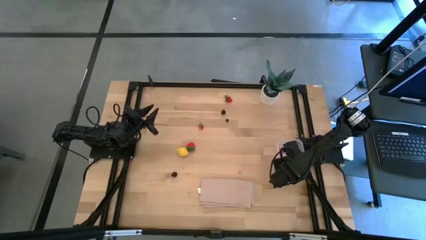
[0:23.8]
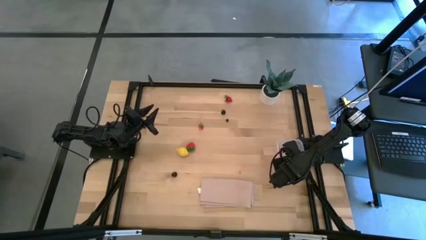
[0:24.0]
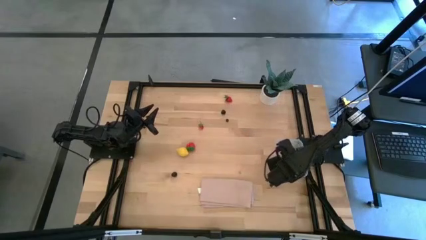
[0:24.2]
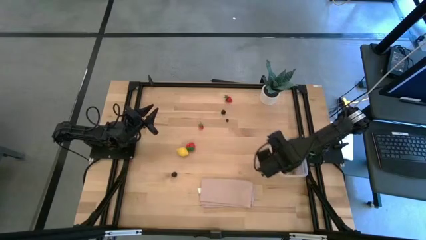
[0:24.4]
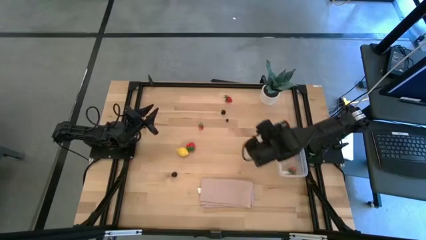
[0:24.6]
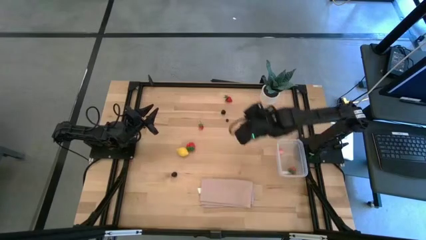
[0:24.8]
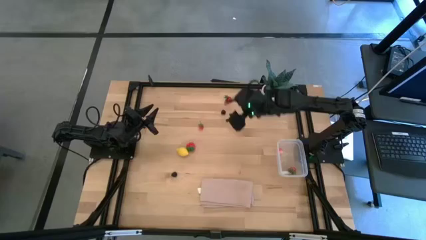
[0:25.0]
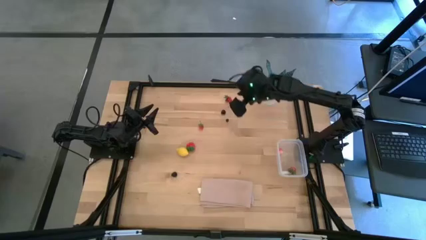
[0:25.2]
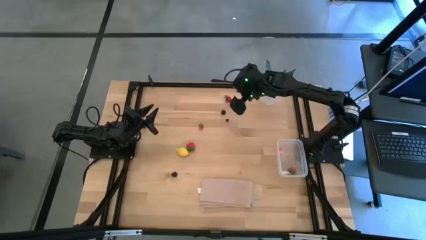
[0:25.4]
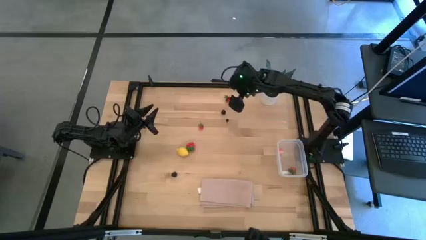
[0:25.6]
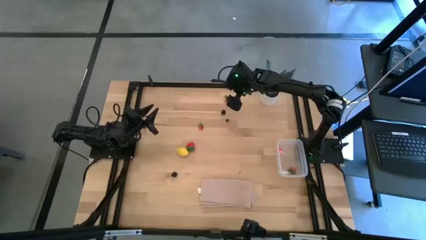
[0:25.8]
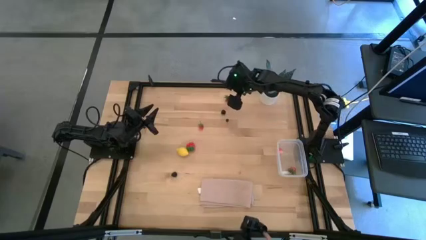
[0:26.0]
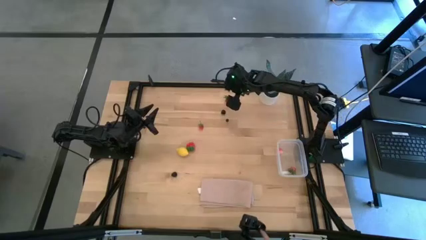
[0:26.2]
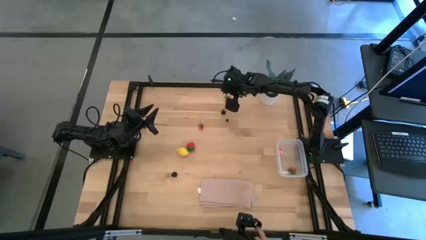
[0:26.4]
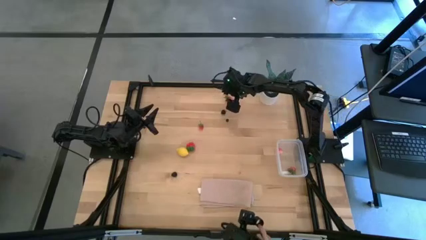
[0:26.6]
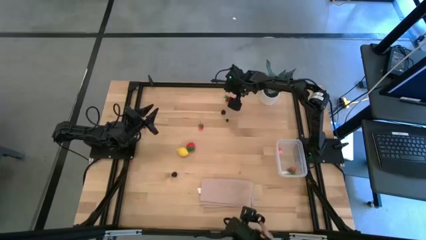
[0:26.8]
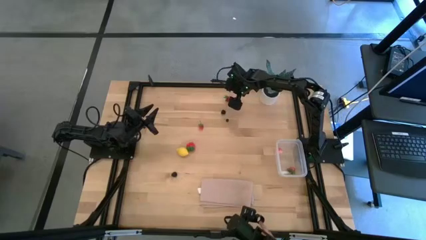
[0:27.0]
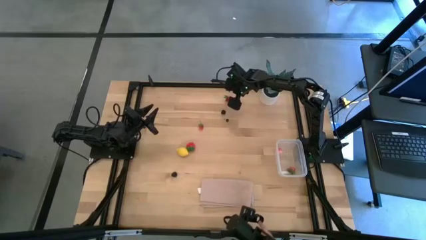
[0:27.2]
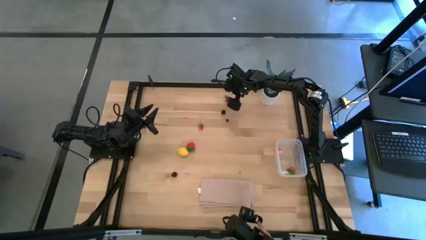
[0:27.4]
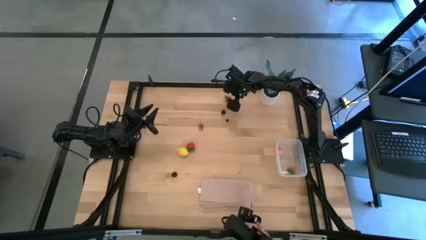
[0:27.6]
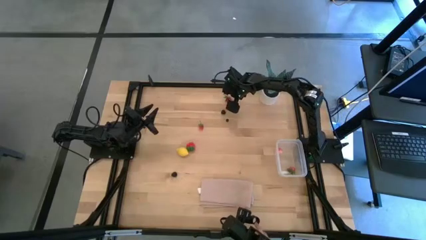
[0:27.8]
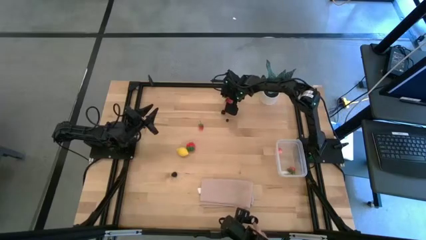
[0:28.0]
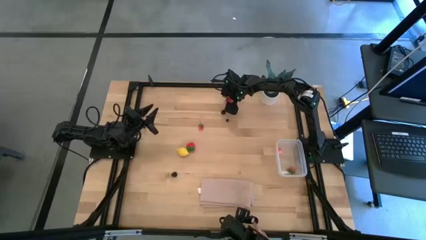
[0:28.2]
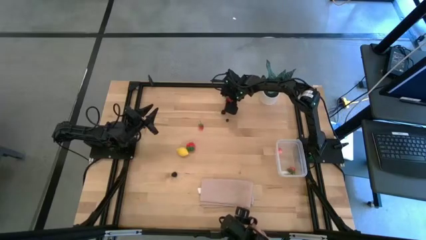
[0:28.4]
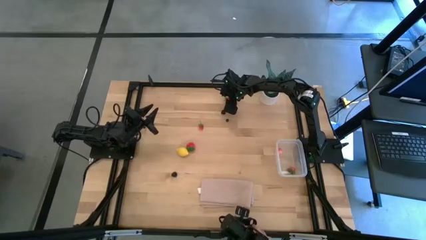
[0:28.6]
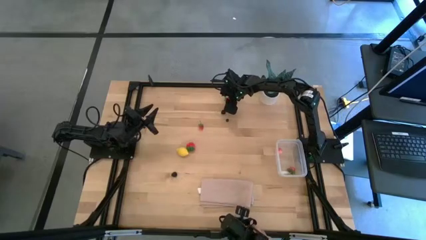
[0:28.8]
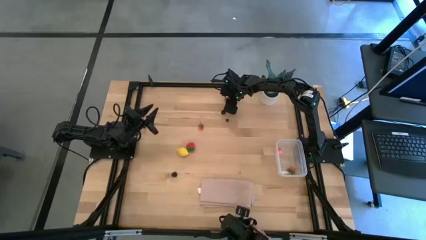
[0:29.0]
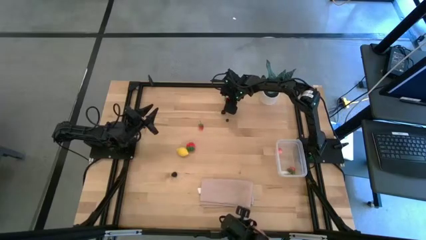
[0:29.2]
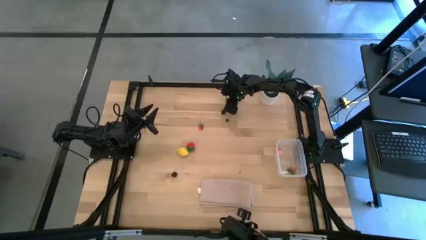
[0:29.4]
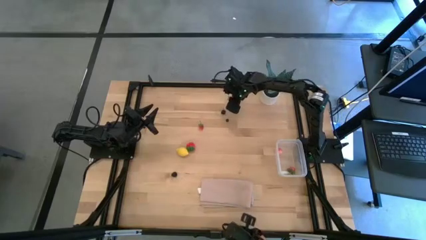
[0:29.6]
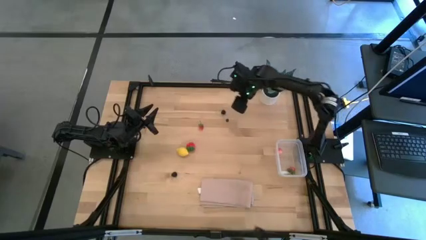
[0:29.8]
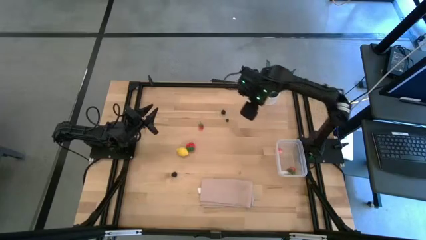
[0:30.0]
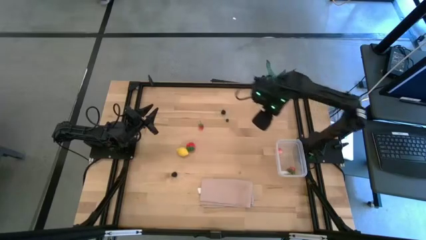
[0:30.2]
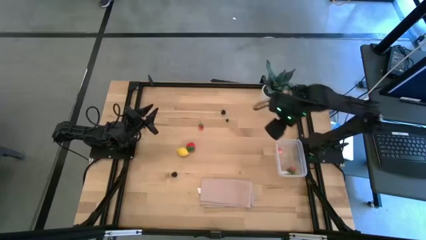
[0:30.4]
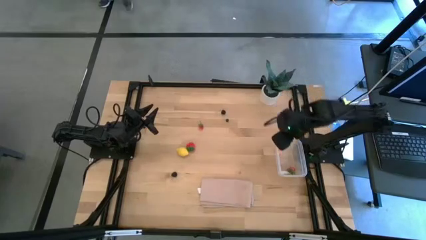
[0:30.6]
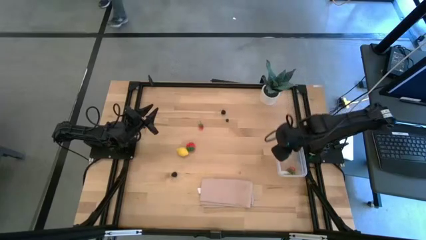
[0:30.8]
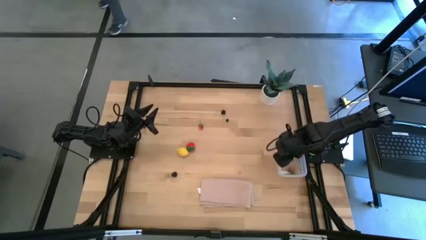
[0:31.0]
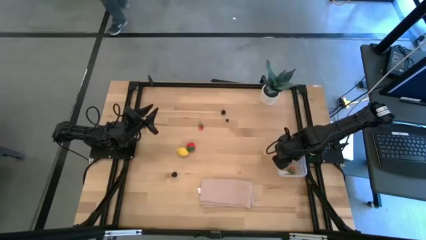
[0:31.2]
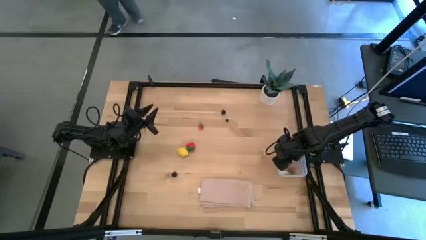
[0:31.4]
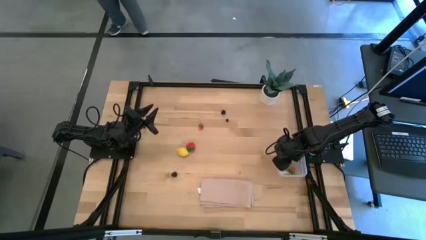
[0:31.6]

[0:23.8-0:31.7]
Task: Pick and placing Produce into tupperware
Put the top red strawberry into the transparent bin

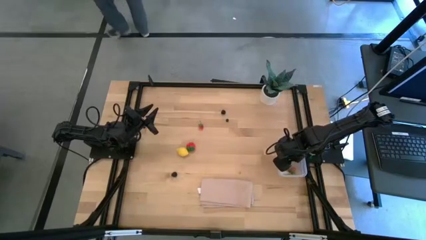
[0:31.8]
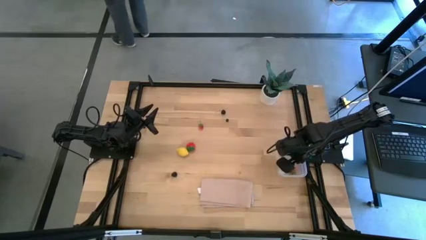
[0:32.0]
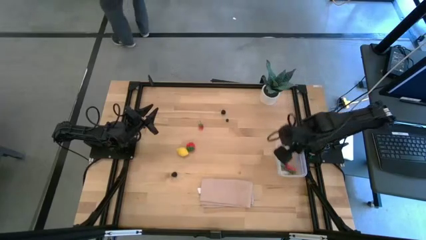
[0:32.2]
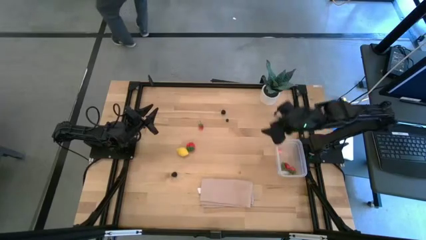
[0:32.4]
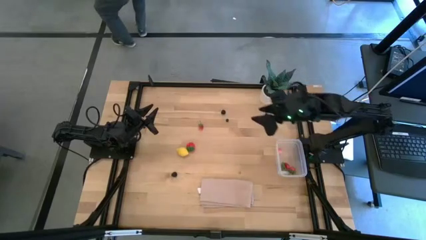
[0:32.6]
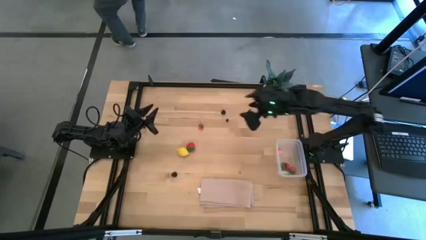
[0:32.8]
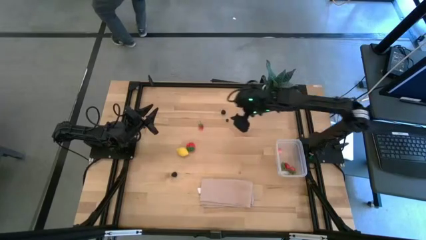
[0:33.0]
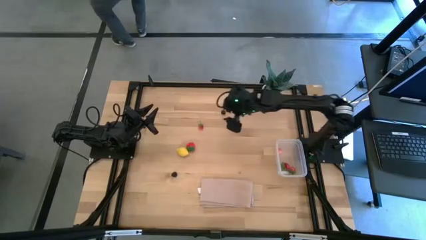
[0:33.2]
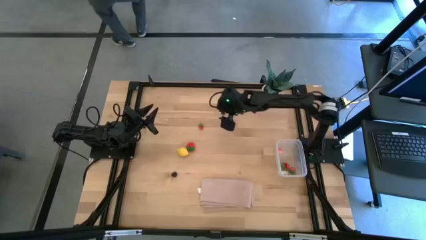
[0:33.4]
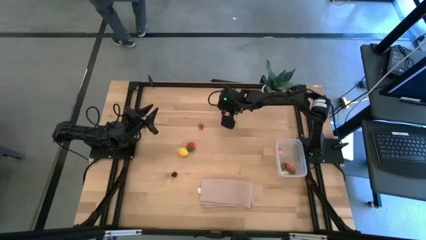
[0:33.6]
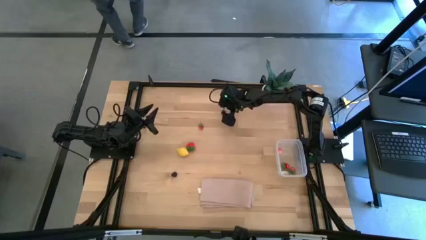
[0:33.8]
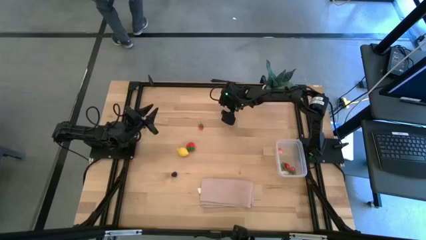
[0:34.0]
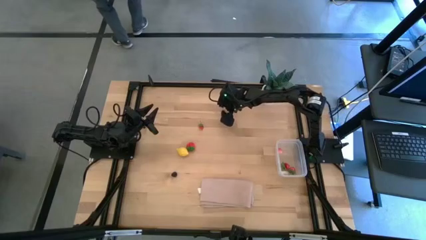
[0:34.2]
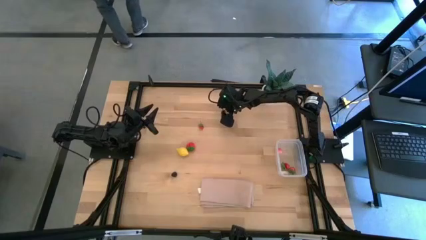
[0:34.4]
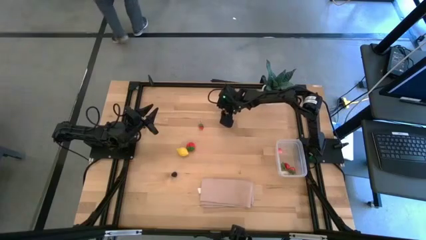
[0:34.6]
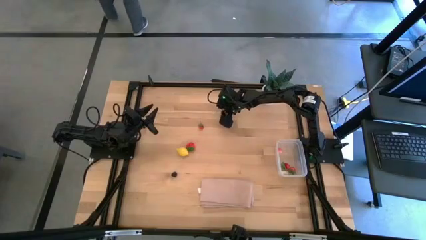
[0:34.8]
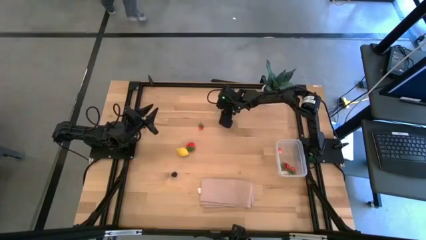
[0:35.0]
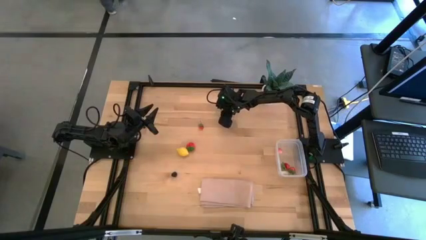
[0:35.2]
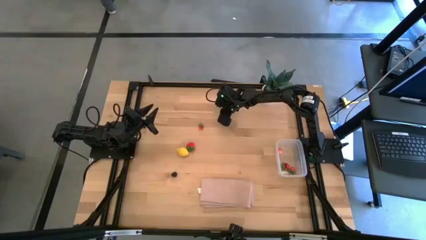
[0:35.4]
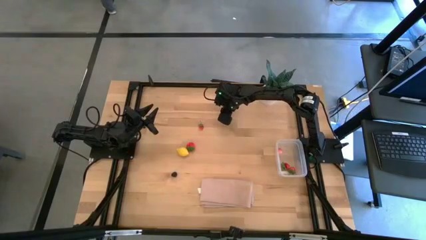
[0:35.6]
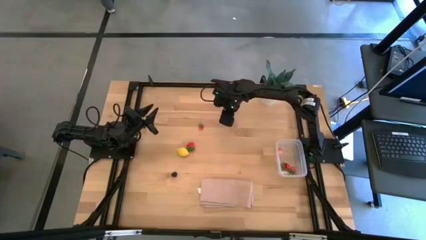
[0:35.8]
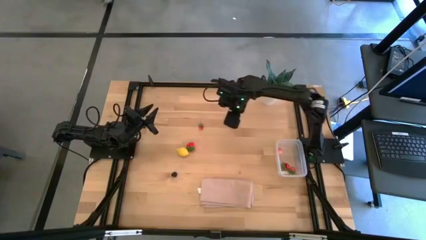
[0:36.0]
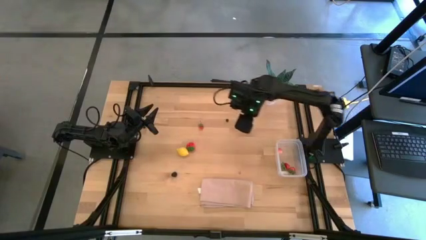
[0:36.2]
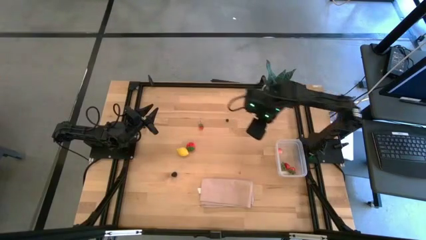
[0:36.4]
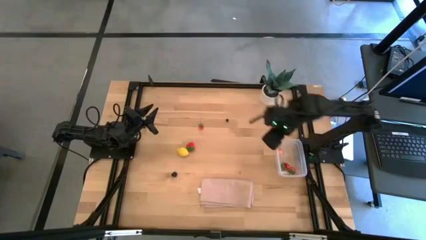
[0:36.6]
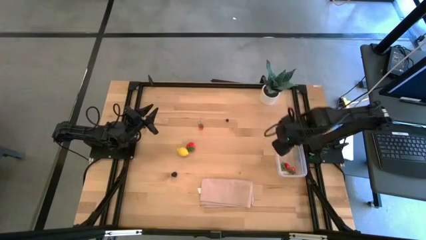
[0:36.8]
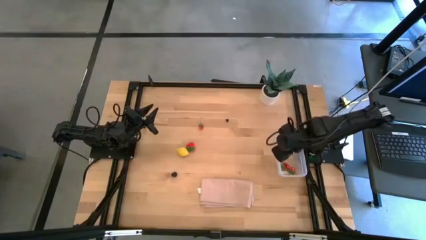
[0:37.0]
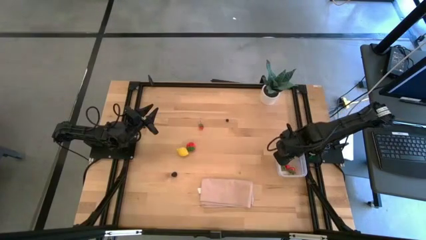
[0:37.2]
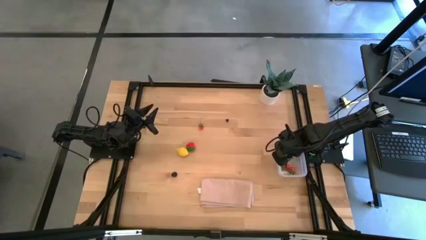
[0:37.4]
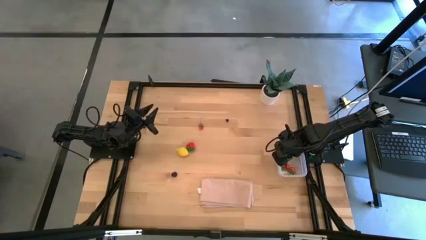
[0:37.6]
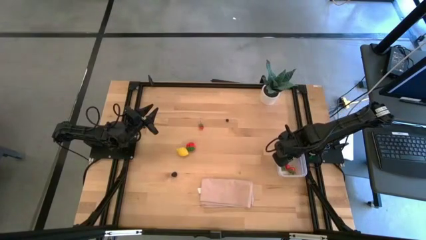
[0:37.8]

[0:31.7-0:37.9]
Put the black cherry into the transparent bin

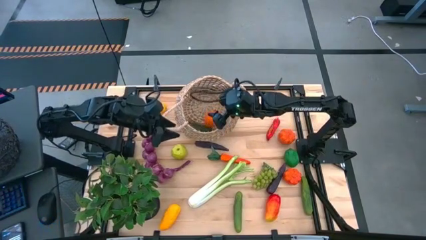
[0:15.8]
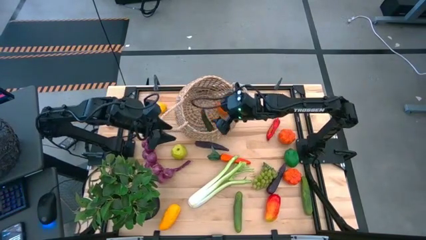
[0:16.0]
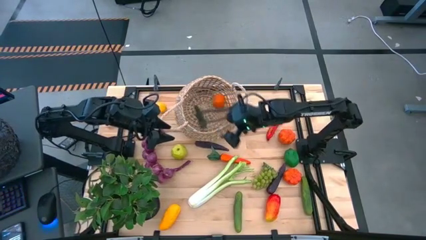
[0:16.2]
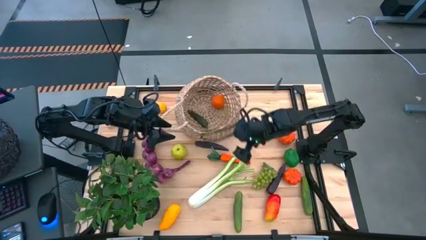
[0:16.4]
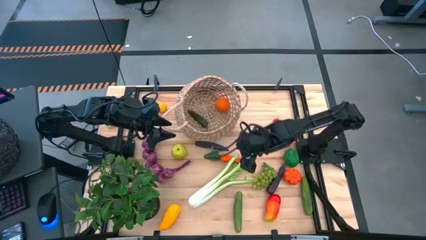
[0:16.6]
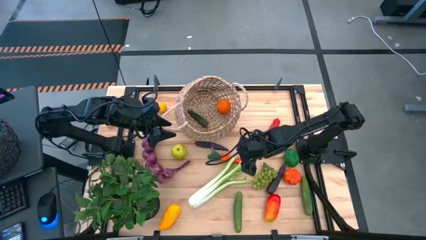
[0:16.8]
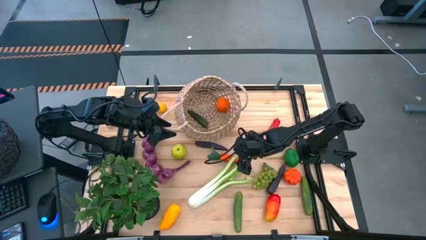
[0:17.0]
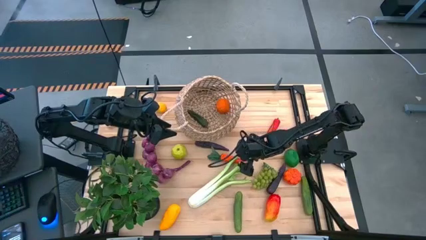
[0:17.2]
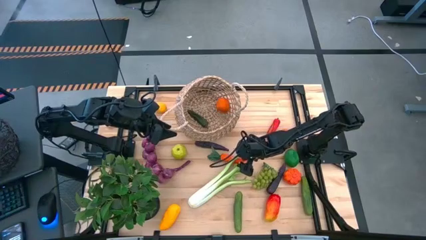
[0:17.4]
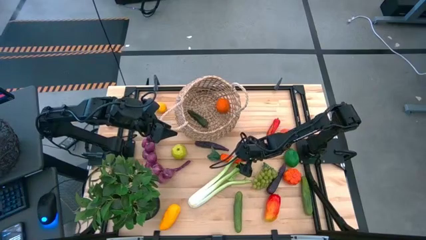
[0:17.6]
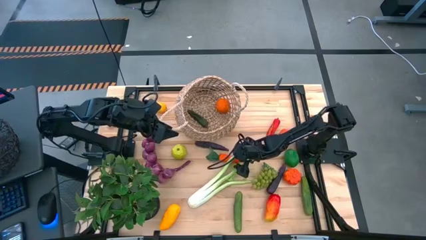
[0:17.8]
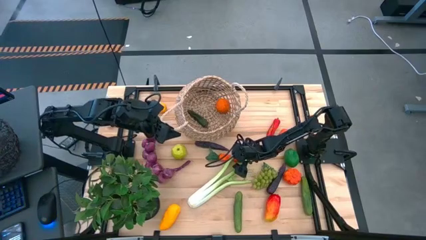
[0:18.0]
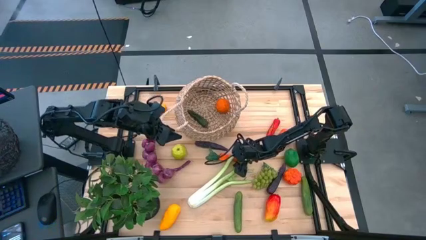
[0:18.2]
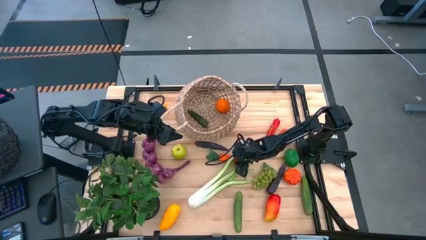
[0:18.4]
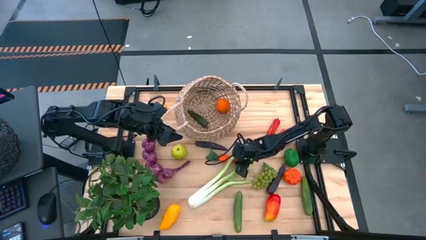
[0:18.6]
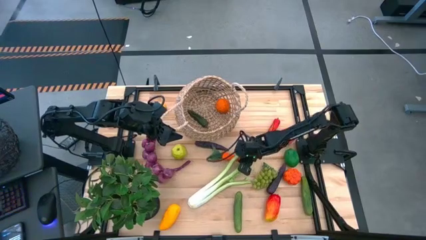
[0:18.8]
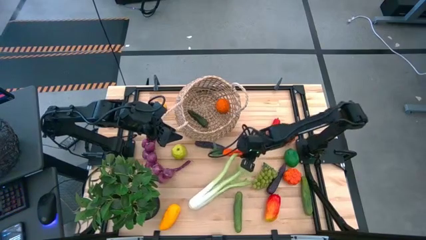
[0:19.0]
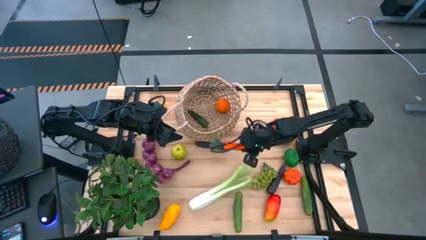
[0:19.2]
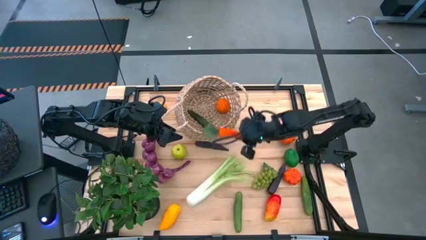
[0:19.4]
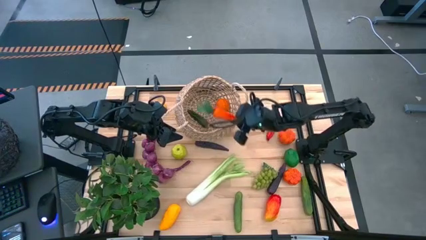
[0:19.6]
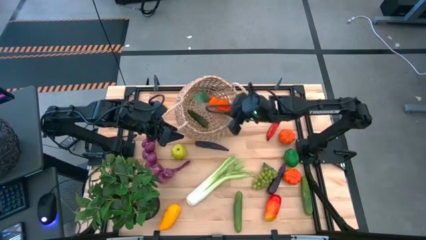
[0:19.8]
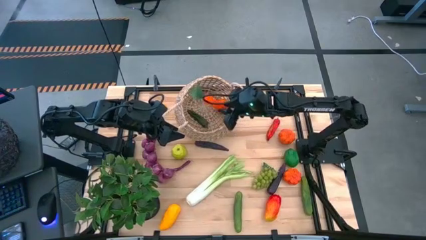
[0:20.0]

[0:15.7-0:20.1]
Task: Build produce basket
Put the carrot into the brown basket
